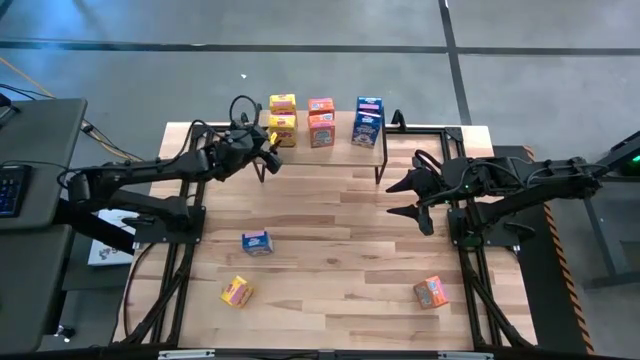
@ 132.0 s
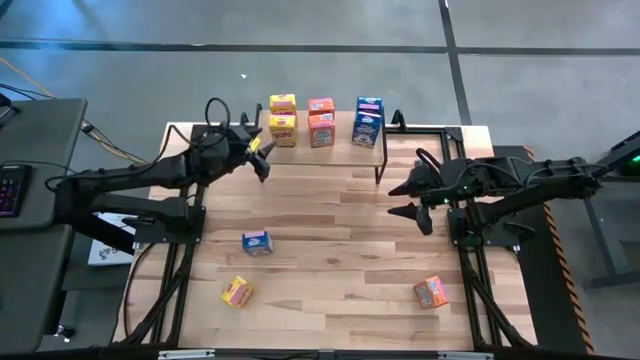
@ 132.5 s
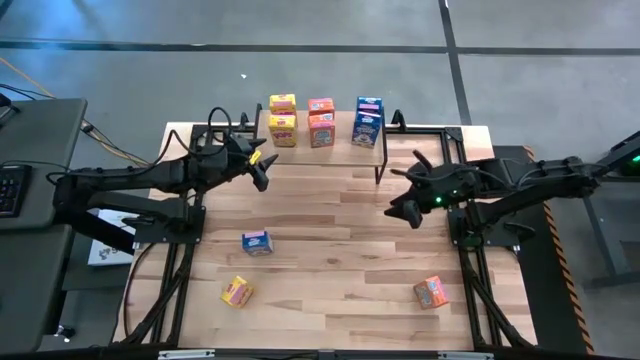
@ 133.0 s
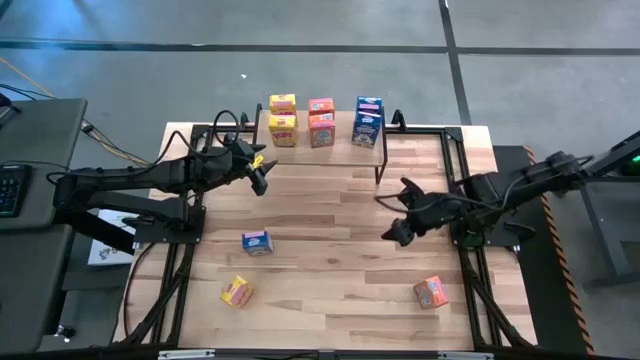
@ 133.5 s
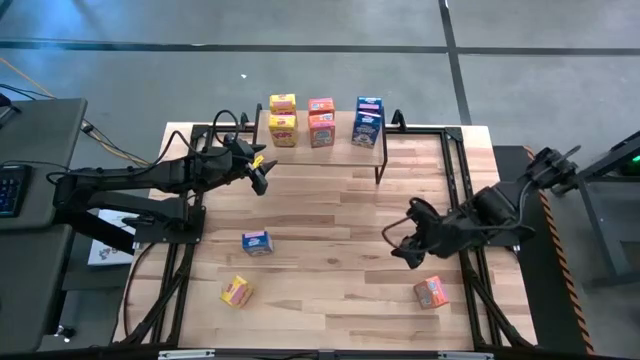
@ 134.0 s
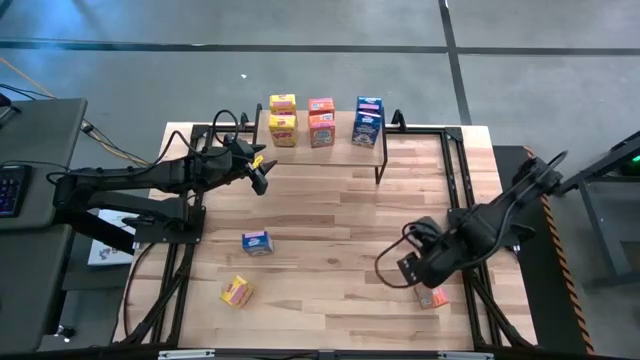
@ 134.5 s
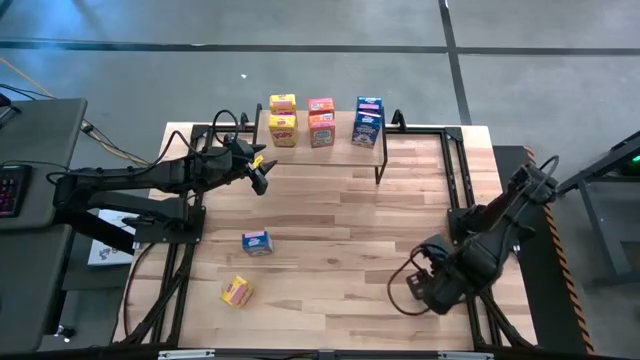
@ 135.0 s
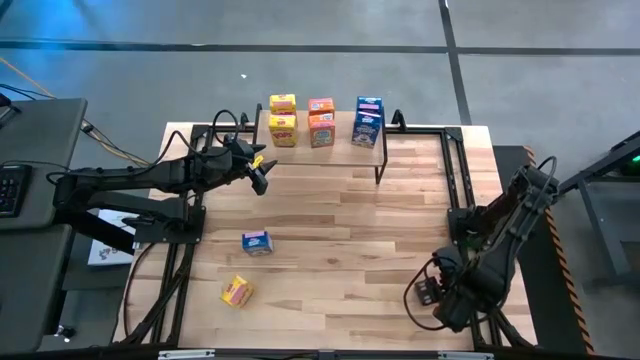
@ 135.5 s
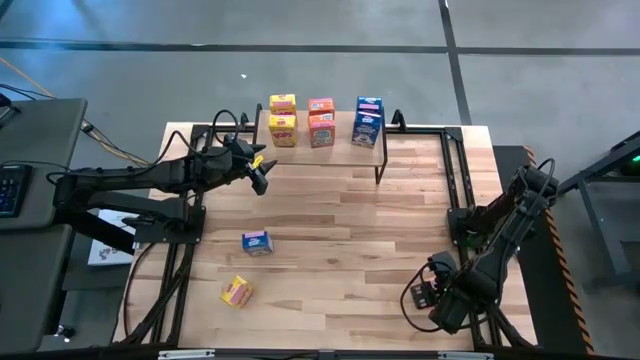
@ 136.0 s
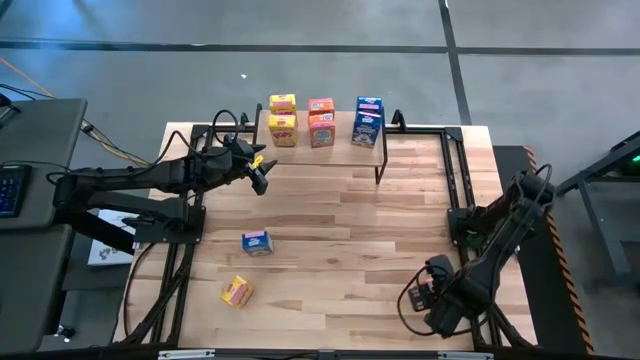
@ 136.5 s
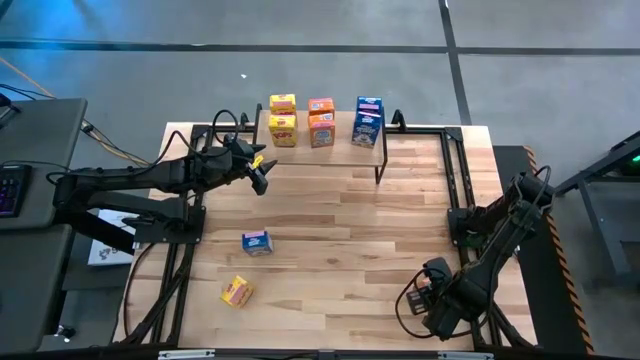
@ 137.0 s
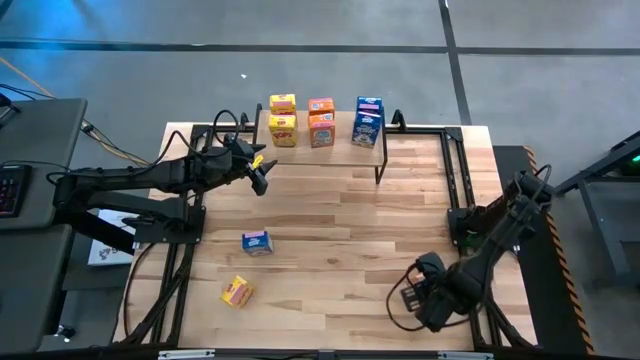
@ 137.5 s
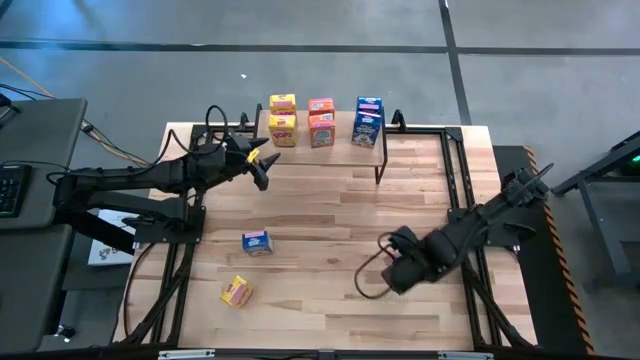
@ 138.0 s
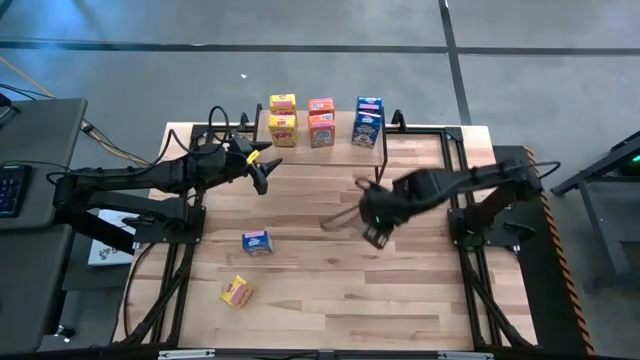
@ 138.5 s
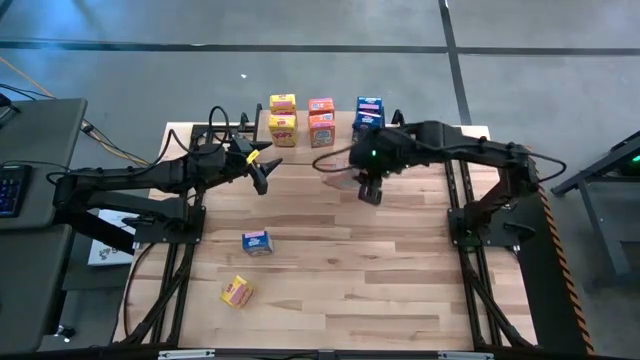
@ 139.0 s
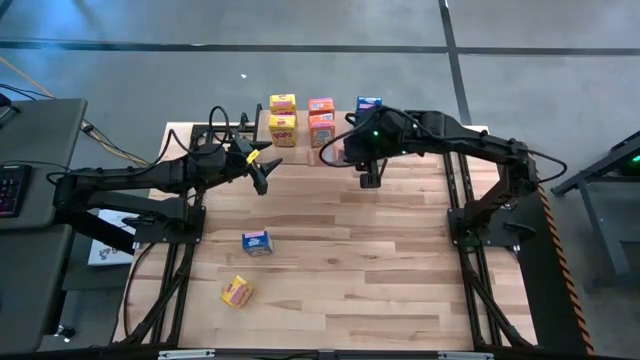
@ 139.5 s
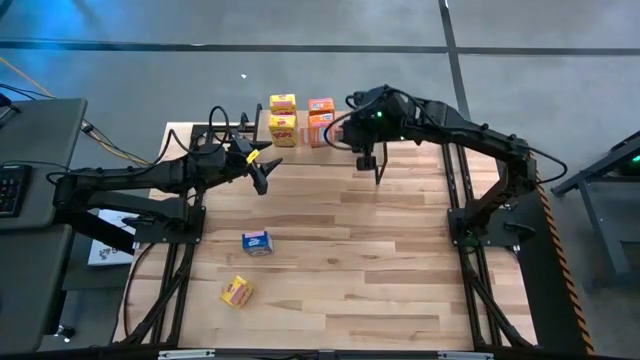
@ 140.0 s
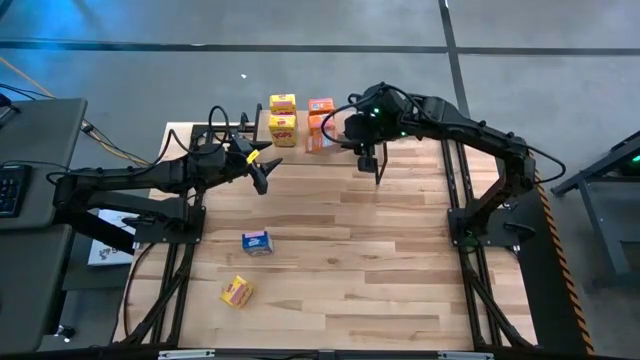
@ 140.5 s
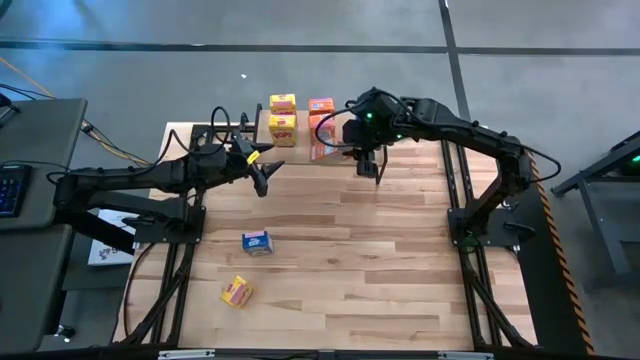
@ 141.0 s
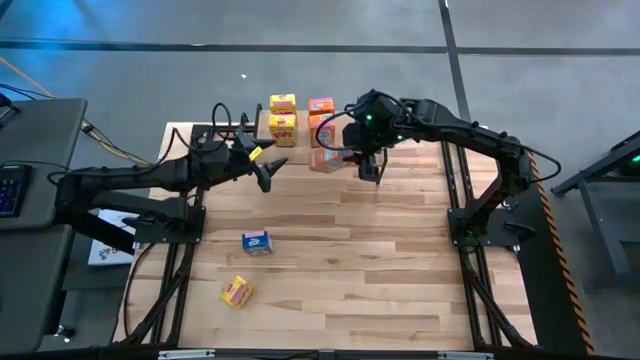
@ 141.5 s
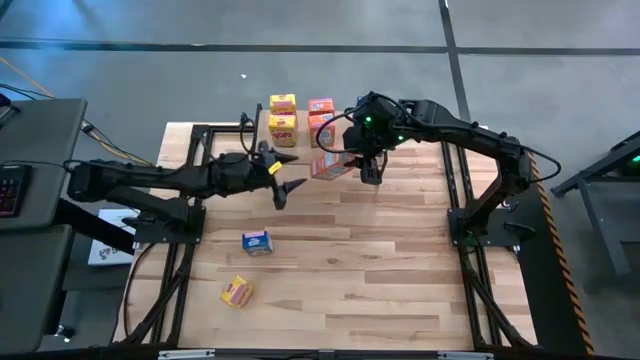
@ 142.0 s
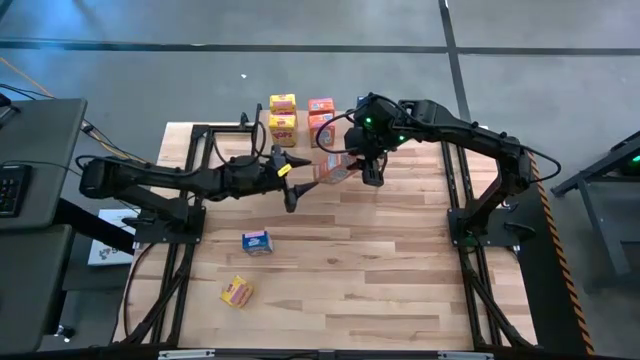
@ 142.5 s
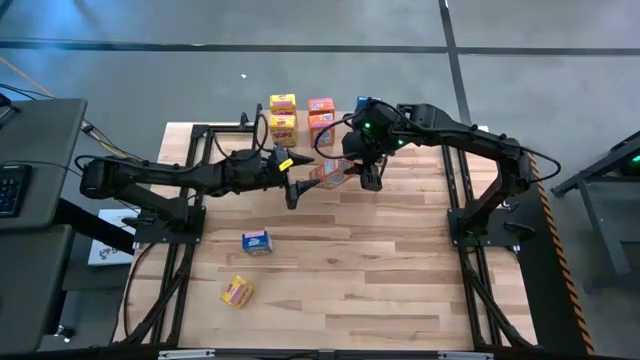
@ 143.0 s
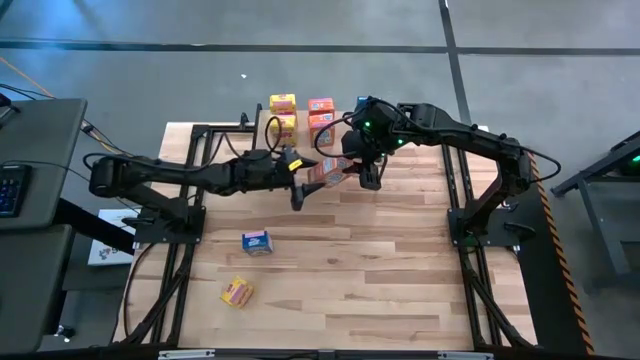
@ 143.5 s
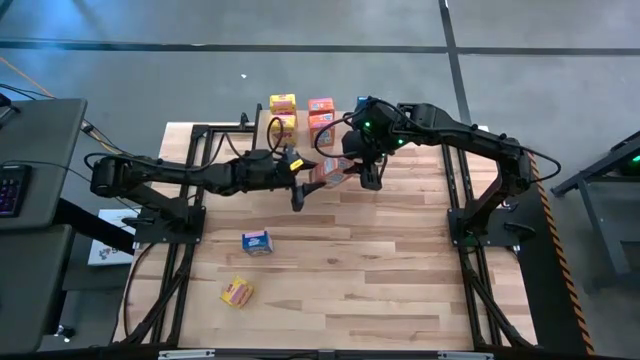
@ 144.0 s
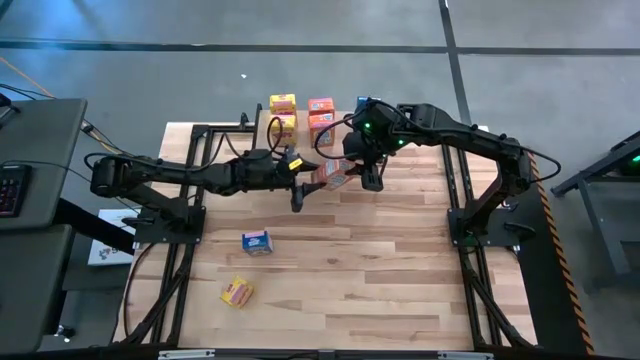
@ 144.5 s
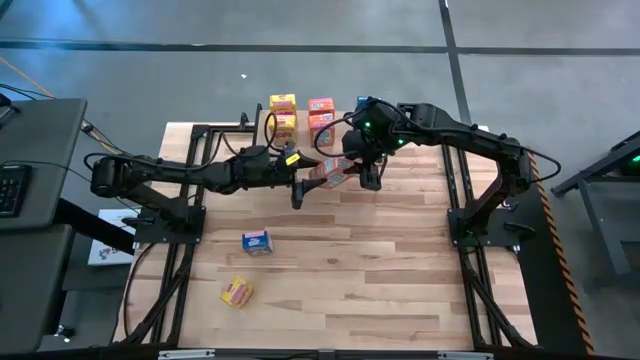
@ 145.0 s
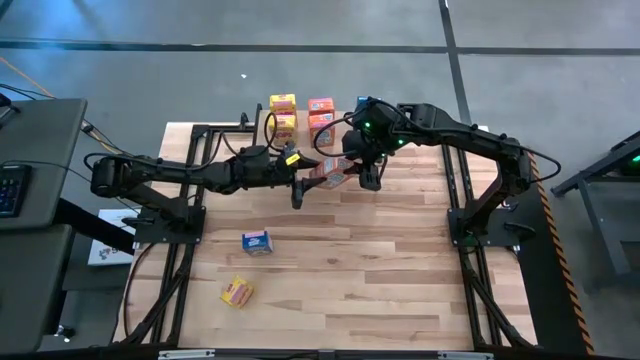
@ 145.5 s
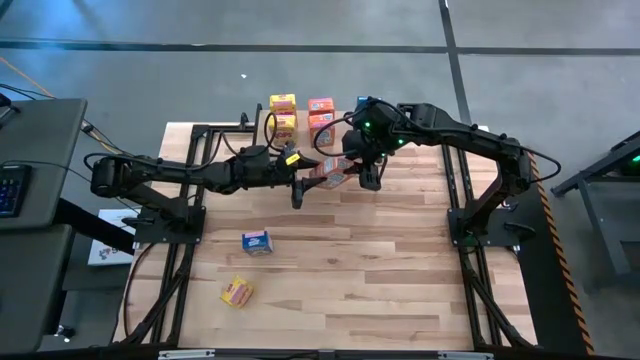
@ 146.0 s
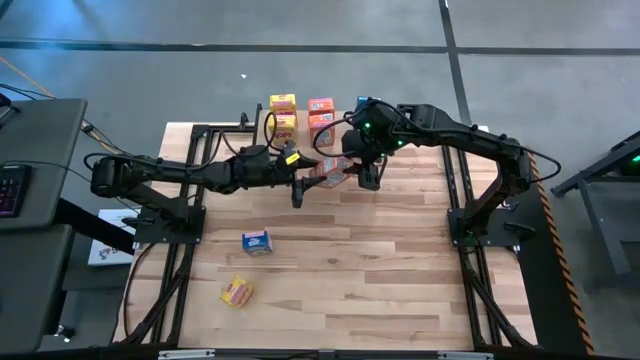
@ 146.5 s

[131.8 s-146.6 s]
Task: Stack cereal on shelf
Put the orange cereal box on the shelf aligned with the other orange cereal boxes
